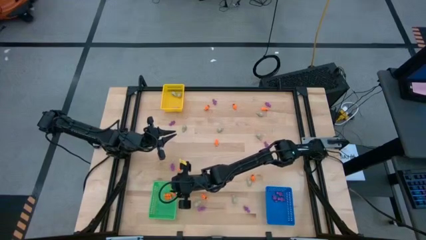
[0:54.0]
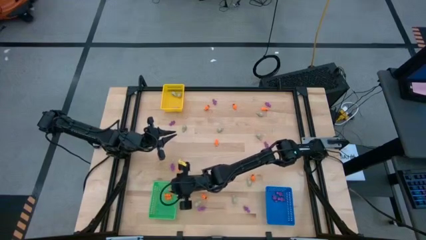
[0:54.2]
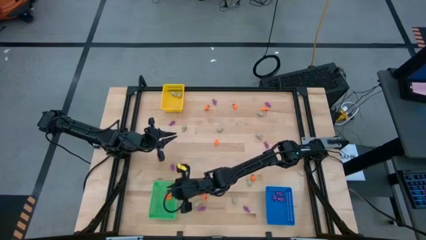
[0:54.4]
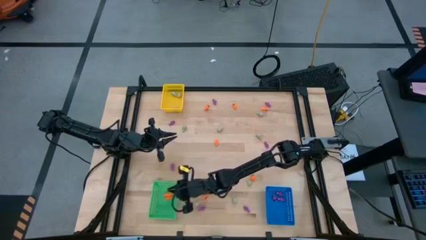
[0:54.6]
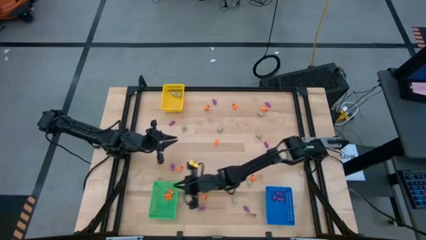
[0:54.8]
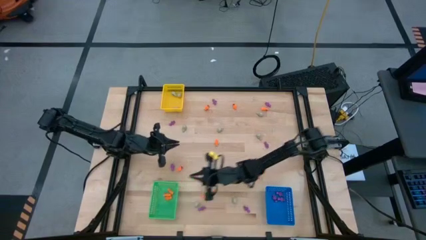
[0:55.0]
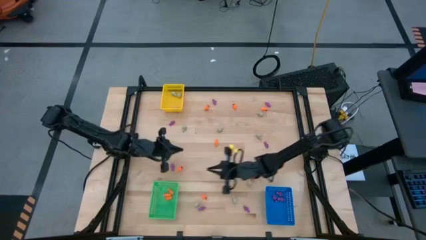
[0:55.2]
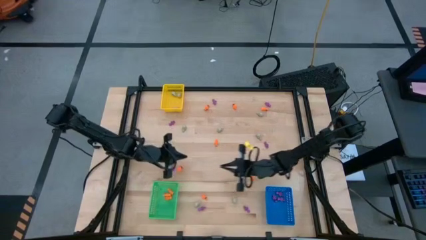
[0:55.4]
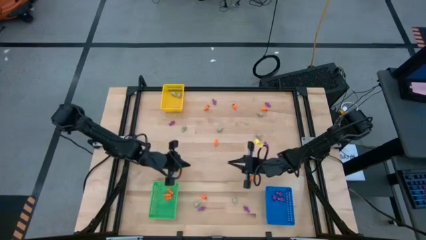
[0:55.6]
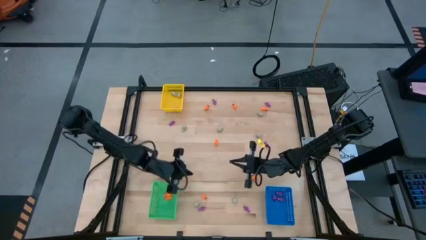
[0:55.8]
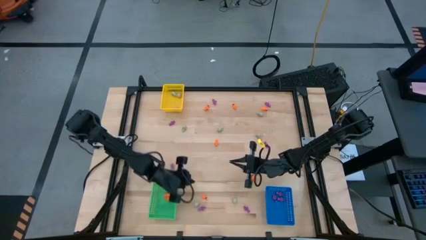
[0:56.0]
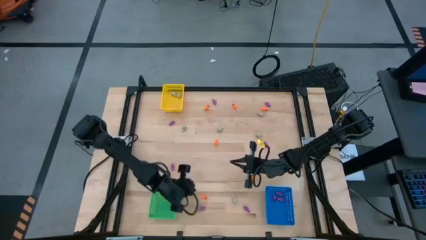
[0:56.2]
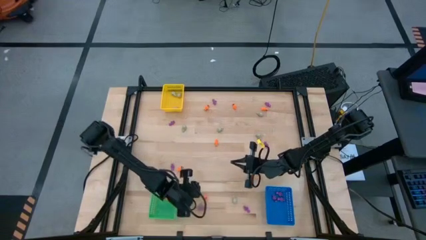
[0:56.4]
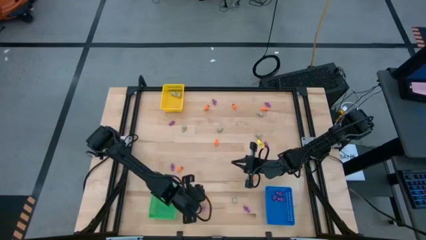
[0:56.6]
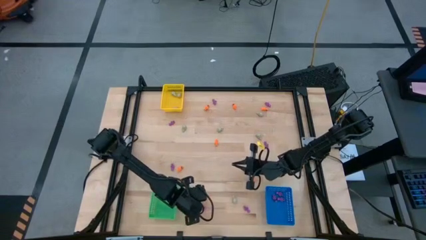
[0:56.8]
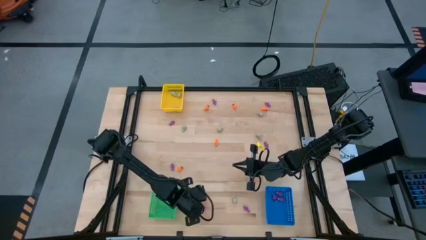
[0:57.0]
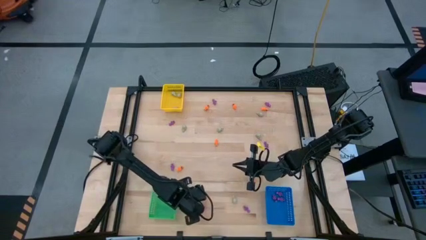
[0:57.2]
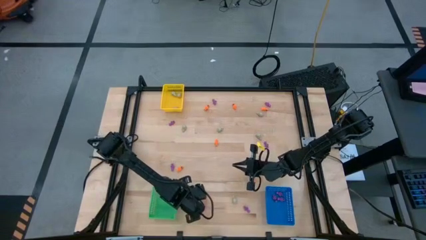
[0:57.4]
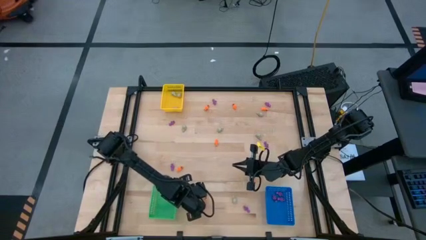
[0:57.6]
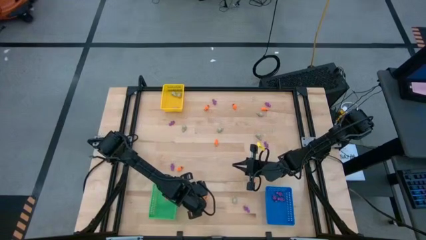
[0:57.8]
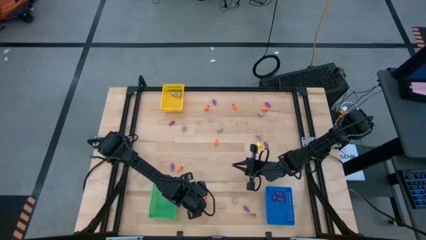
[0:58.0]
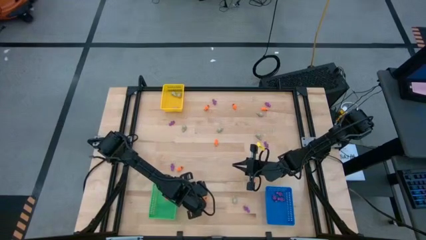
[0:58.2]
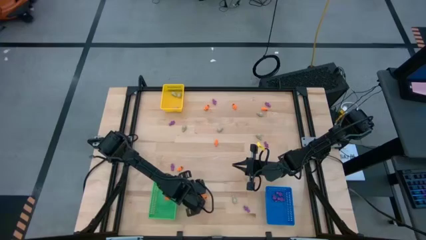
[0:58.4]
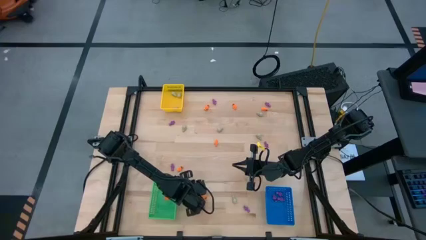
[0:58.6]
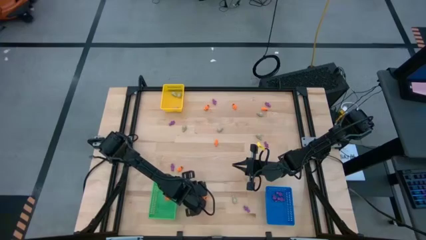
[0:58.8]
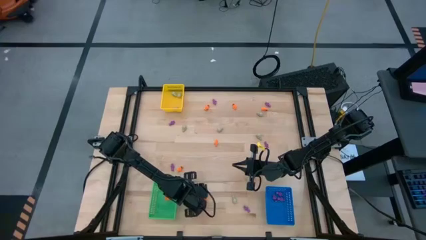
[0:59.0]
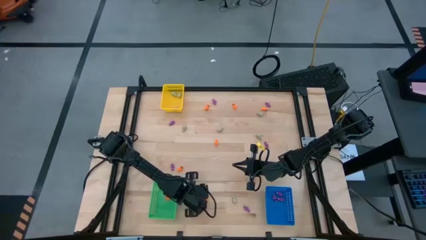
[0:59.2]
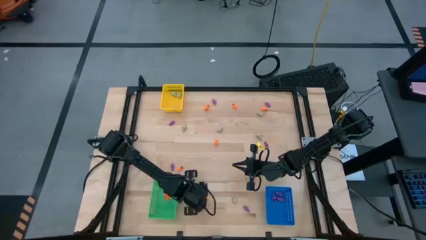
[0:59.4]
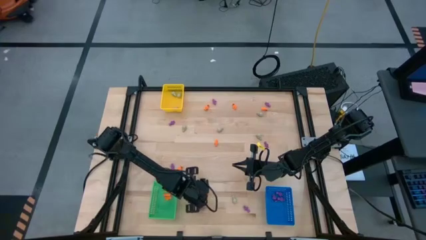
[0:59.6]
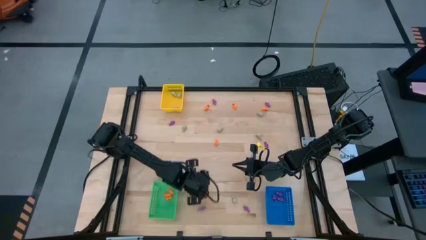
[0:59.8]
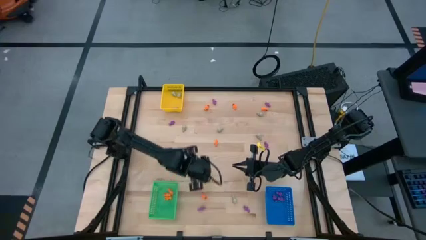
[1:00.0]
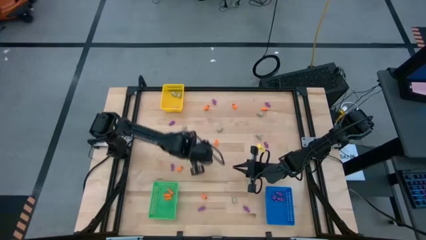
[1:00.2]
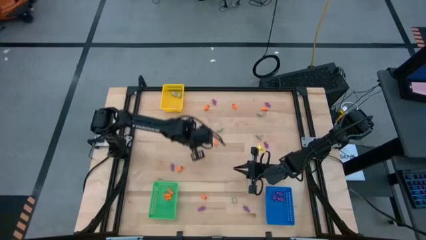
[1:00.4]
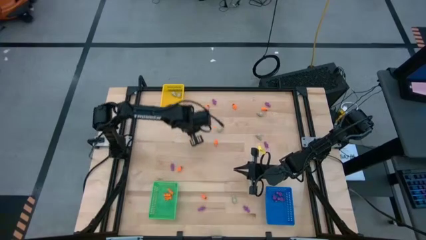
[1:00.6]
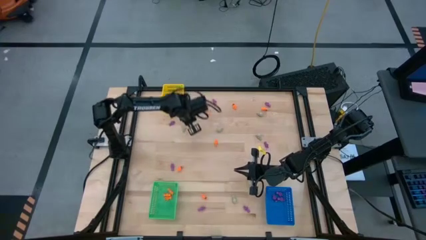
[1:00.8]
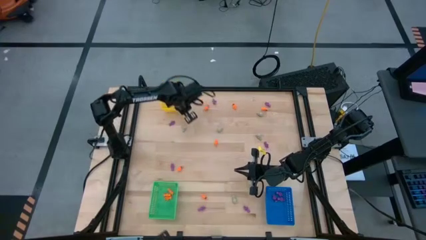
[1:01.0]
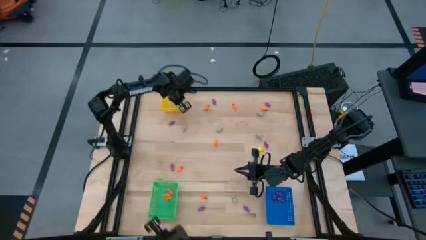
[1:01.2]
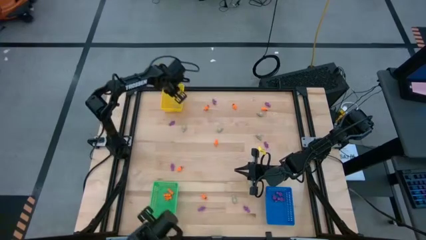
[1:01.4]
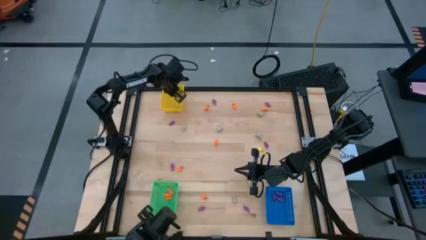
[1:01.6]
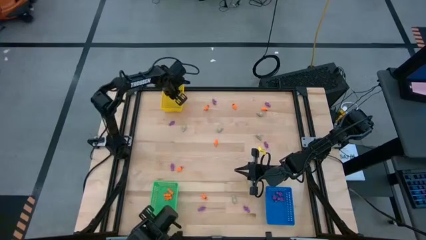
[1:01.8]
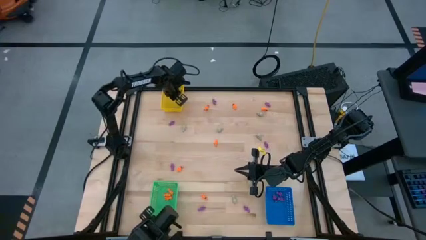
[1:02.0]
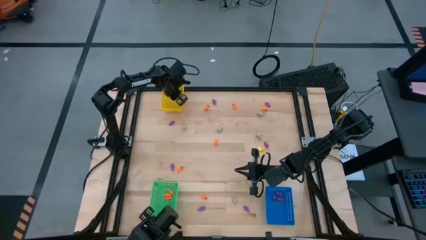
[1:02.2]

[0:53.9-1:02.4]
Task: Sort Halloween decoration
Put the gray skull toy into the yellow bin

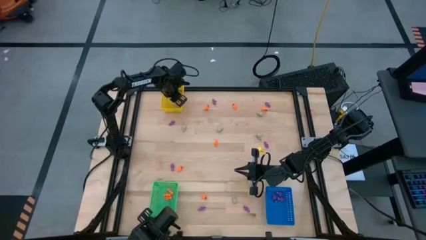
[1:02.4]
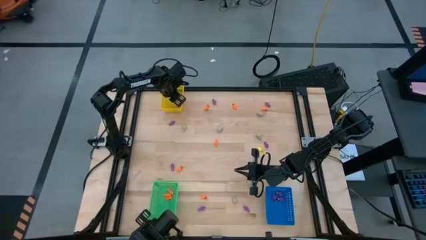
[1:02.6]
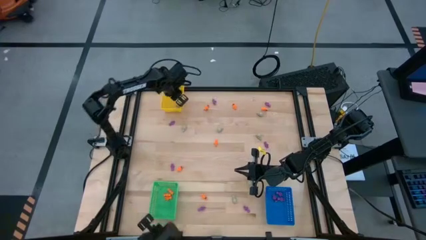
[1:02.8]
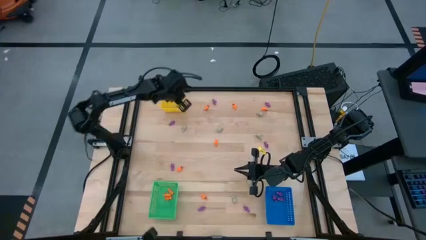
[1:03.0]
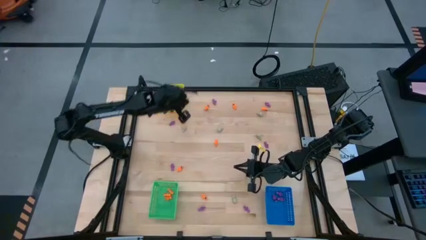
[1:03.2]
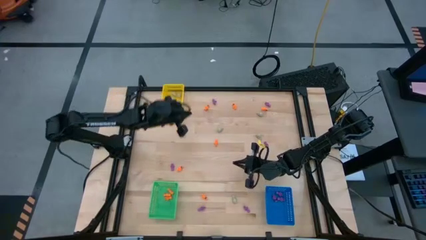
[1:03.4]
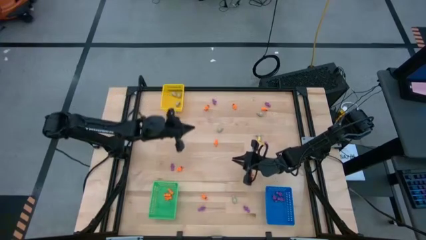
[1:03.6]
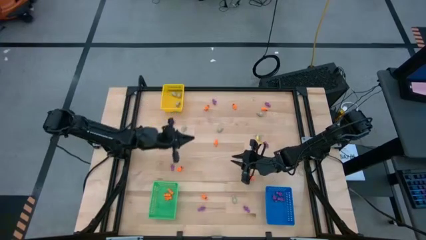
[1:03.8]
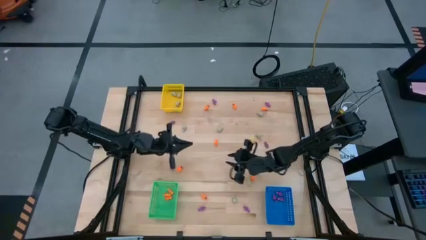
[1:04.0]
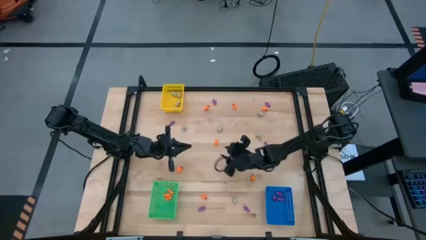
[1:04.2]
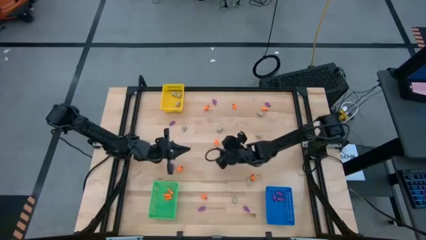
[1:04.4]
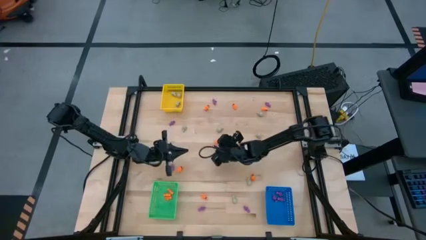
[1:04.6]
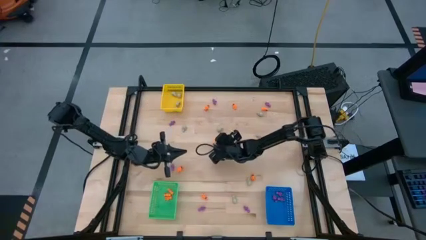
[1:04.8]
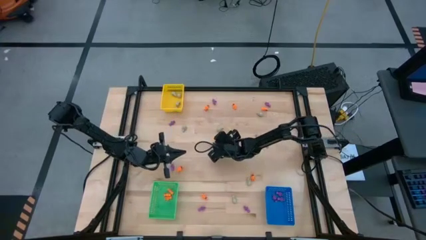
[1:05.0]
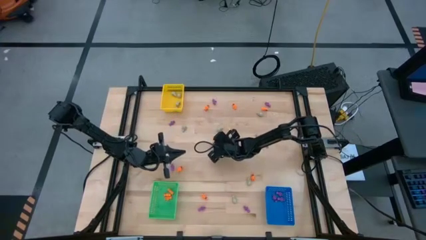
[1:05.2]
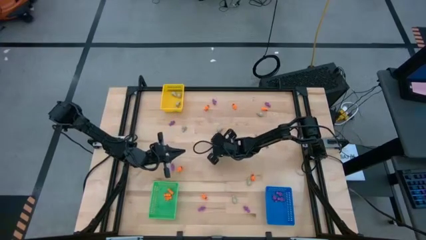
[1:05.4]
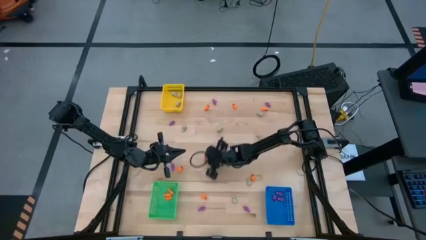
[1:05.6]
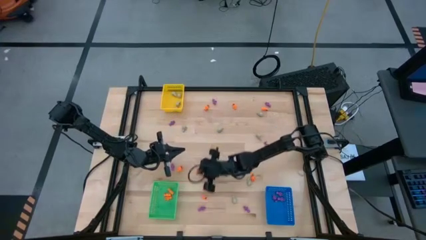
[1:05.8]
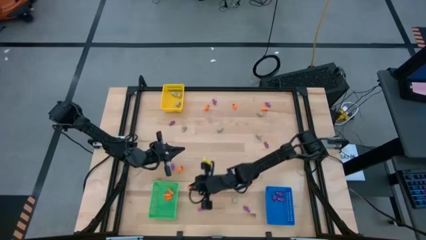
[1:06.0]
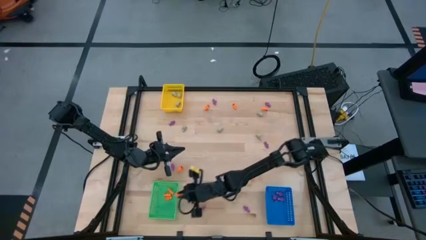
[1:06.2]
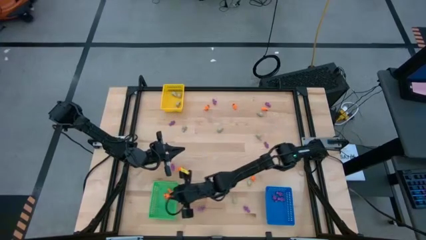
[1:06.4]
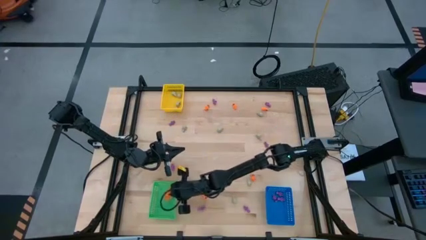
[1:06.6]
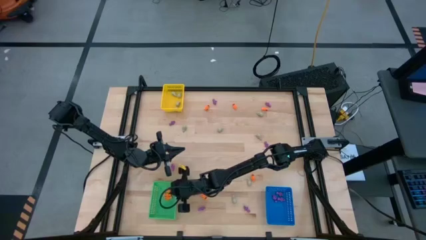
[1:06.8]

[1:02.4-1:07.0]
Put the orange skeleton toy into the green bin

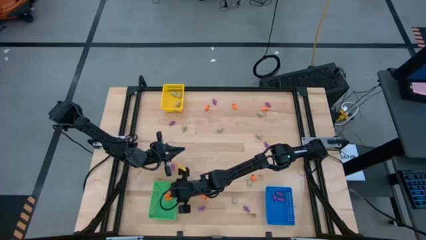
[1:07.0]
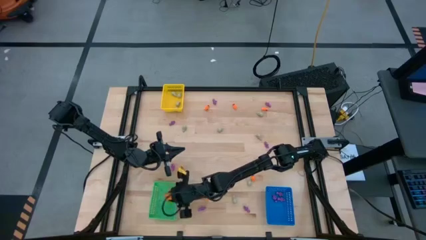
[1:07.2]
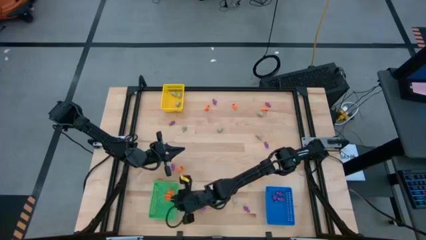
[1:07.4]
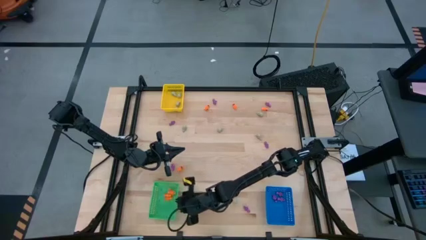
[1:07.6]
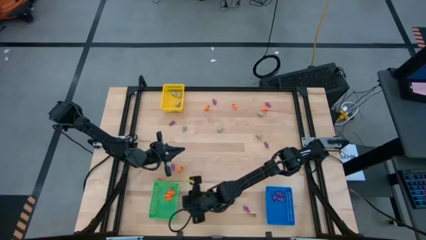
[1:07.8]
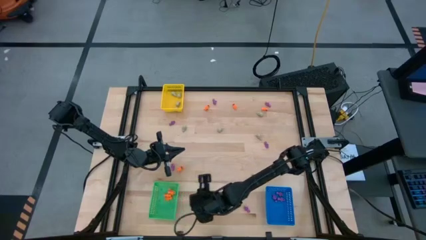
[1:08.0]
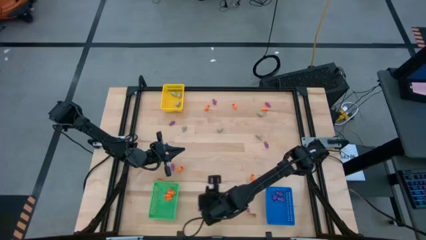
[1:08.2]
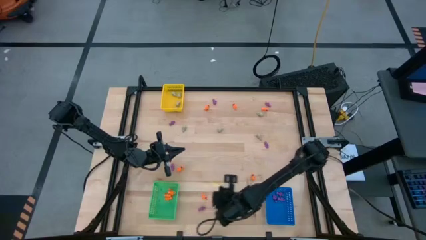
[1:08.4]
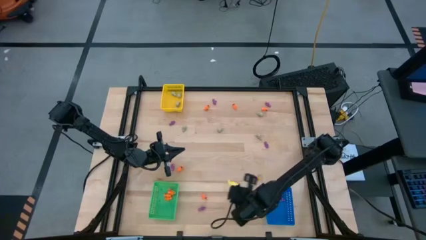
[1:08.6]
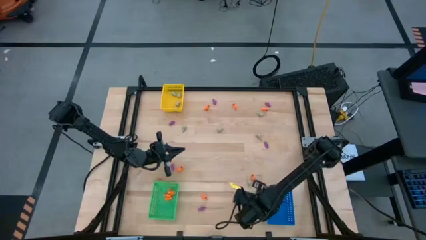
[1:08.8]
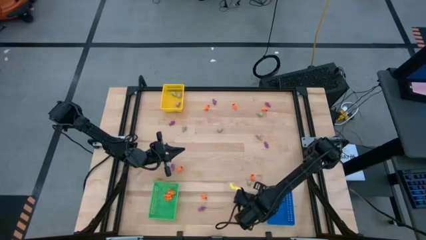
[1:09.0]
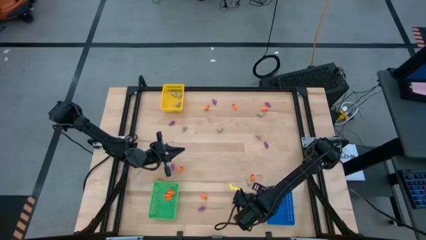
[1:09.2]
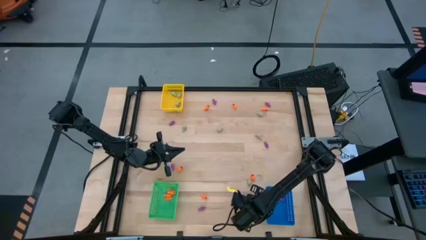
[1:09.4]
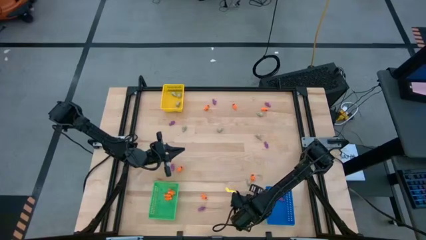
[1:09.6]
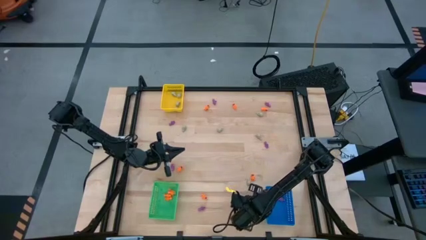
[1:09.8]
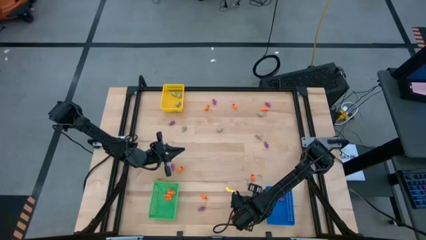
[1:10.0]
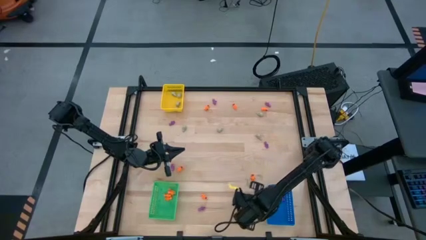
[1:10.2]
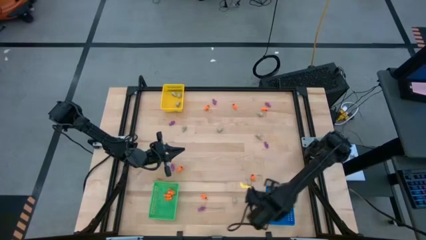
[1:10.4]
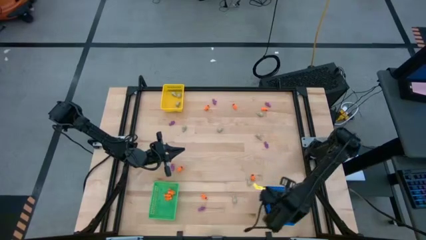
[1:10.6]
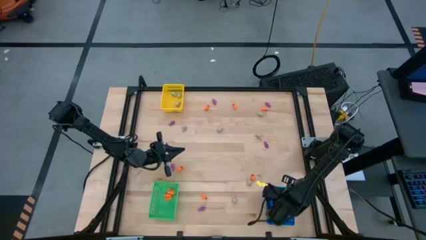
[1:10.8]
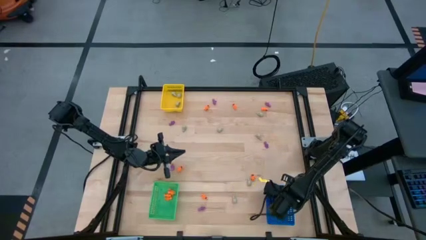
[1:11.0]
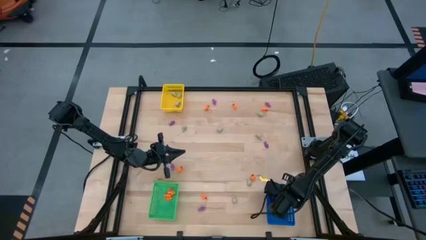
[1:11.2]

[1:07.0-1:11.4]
Put the purple skeleton toy into the blue bin
